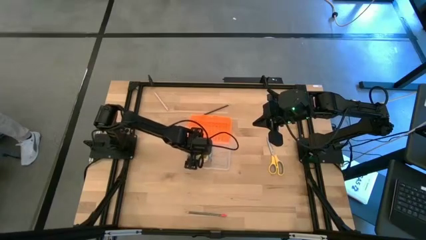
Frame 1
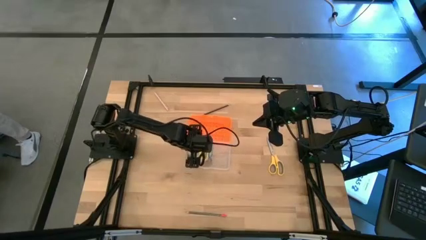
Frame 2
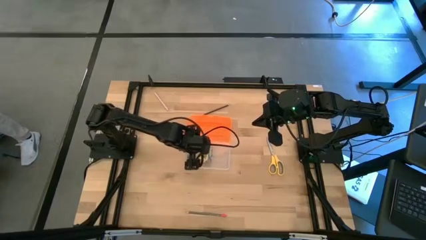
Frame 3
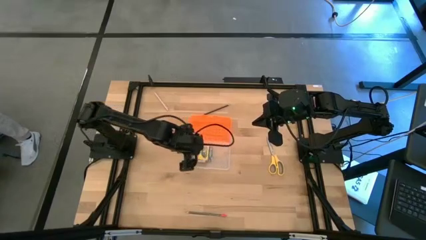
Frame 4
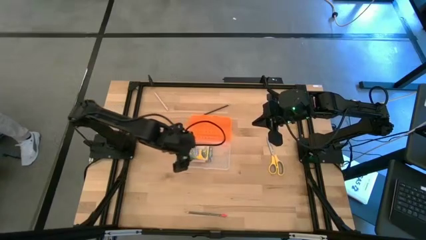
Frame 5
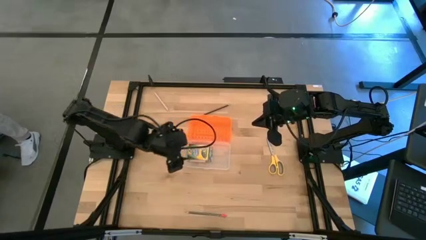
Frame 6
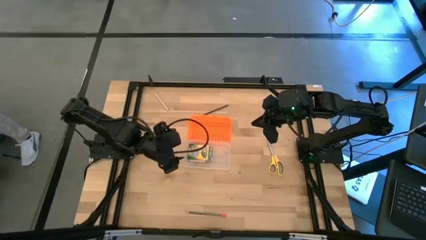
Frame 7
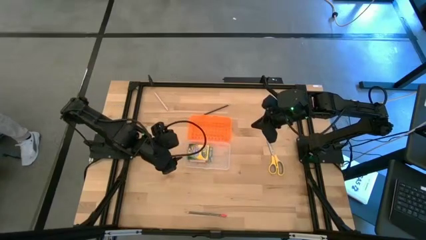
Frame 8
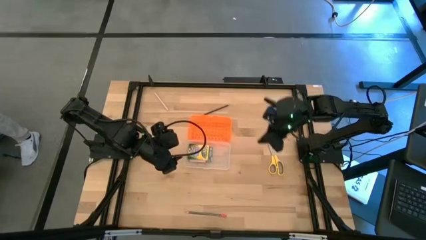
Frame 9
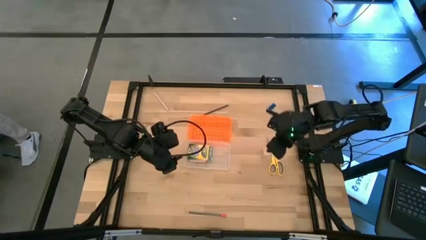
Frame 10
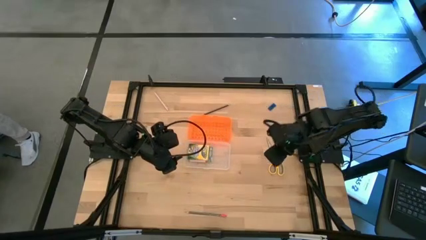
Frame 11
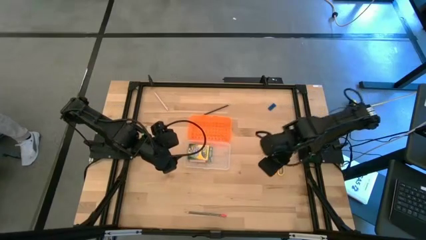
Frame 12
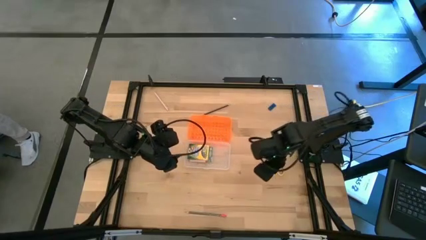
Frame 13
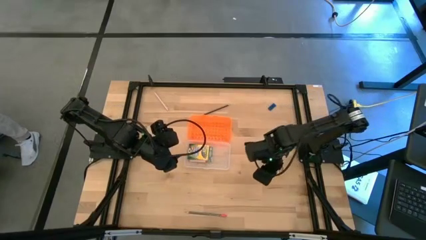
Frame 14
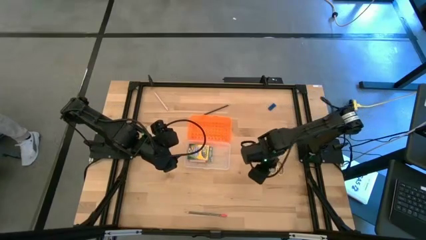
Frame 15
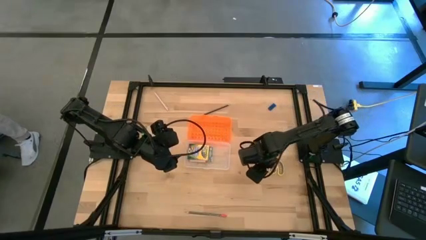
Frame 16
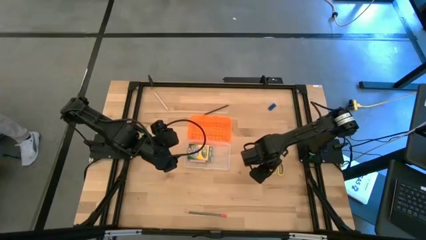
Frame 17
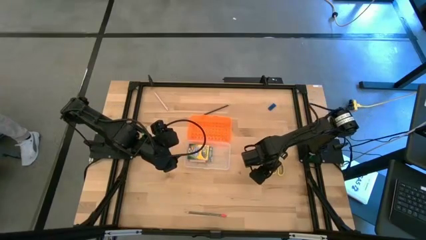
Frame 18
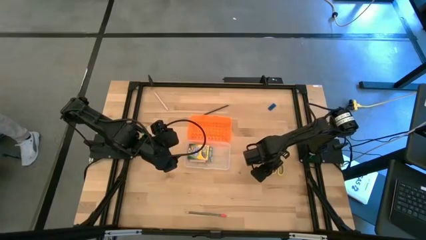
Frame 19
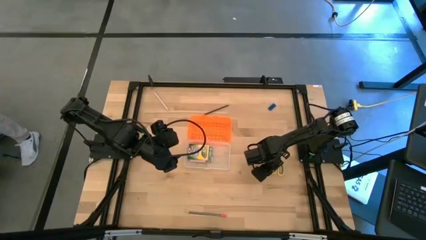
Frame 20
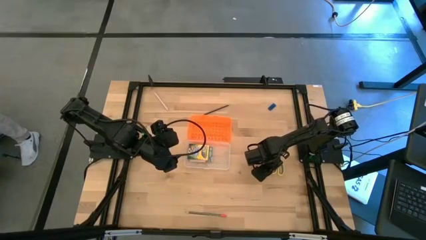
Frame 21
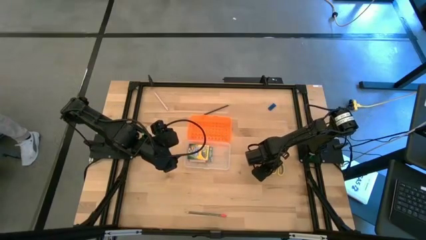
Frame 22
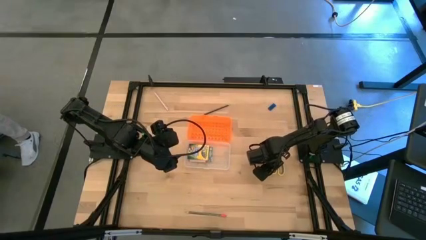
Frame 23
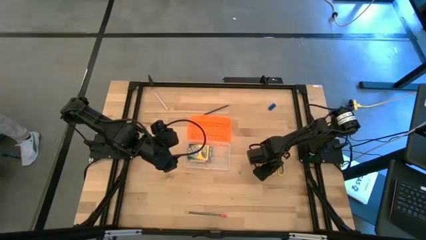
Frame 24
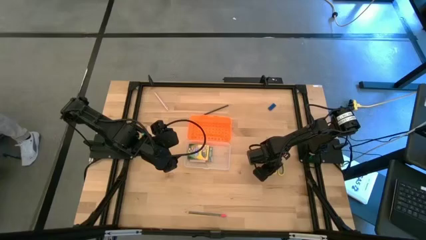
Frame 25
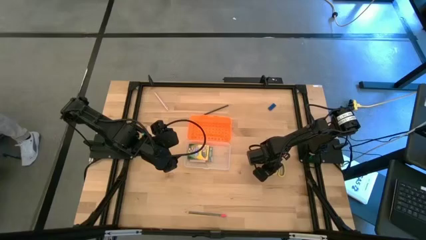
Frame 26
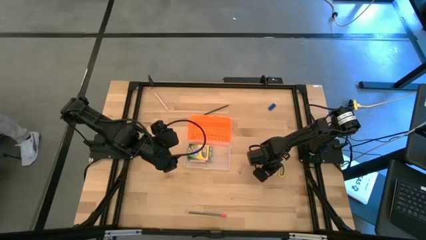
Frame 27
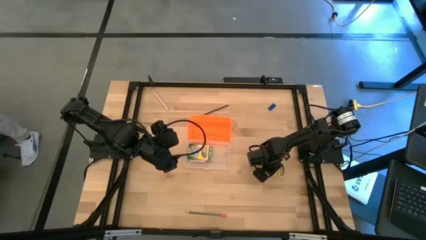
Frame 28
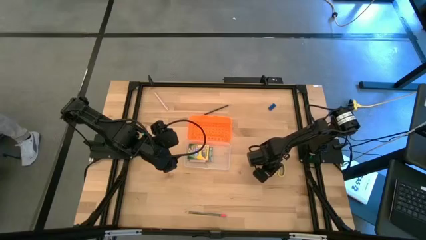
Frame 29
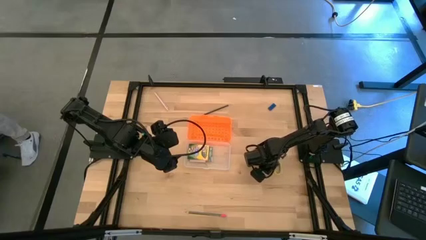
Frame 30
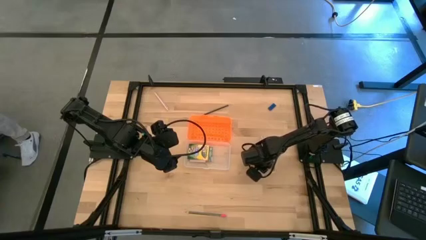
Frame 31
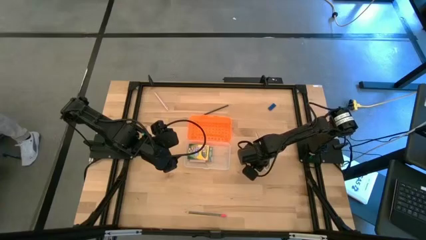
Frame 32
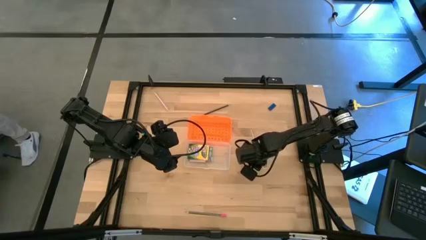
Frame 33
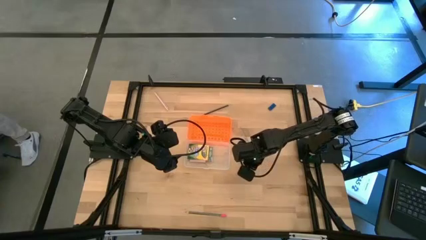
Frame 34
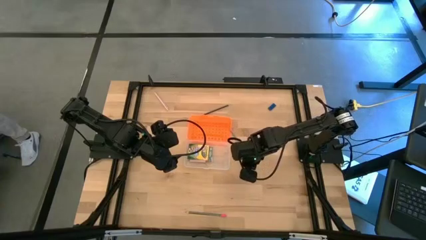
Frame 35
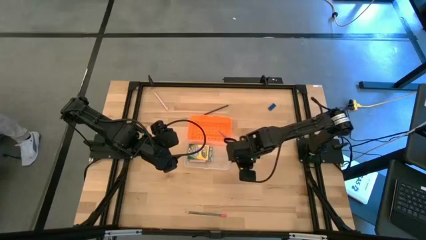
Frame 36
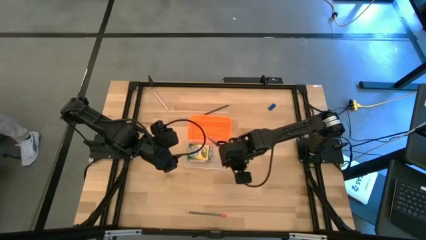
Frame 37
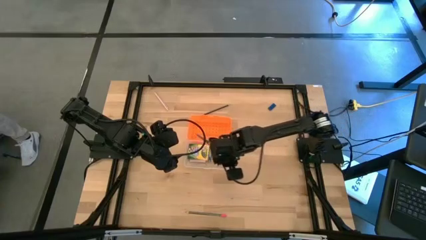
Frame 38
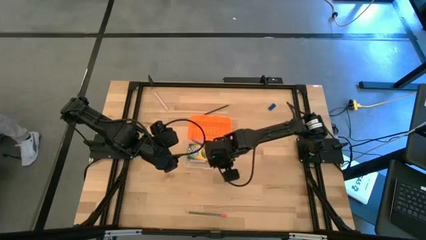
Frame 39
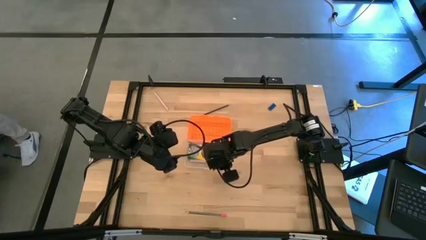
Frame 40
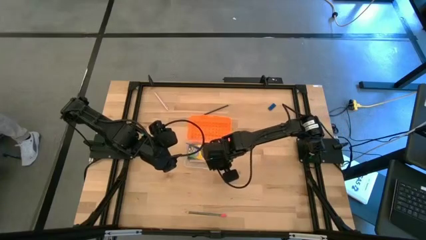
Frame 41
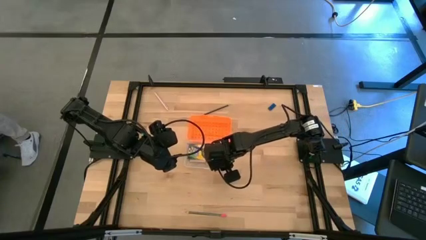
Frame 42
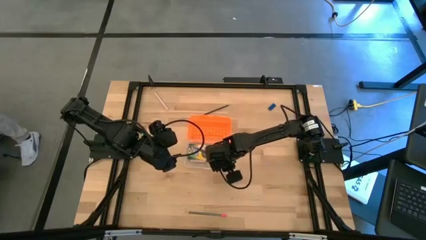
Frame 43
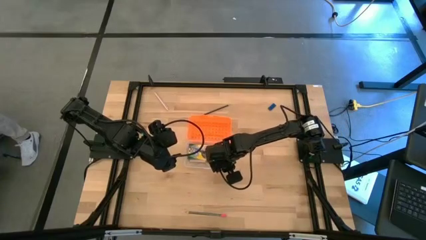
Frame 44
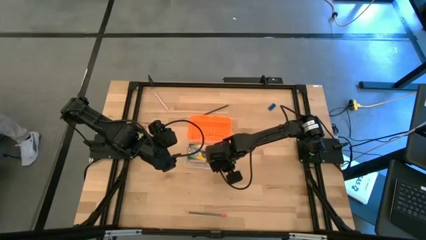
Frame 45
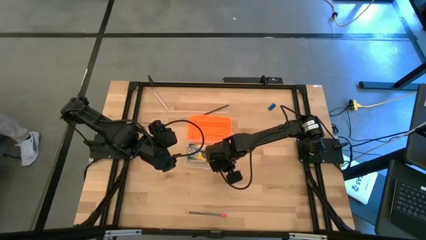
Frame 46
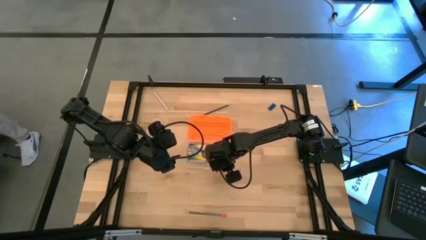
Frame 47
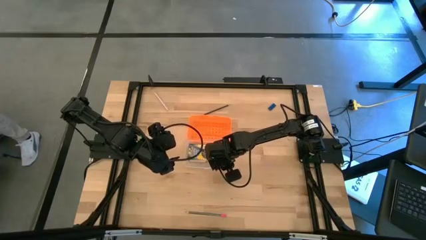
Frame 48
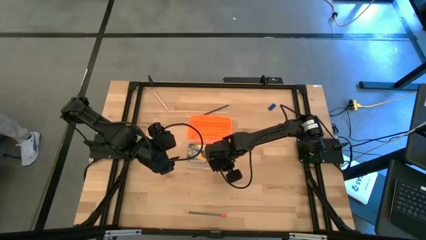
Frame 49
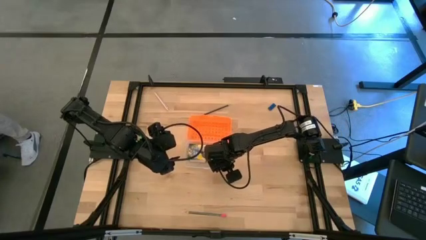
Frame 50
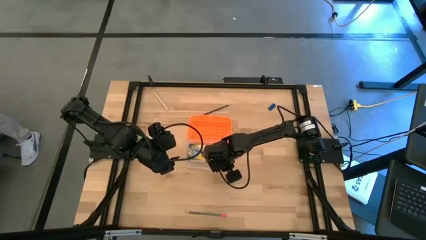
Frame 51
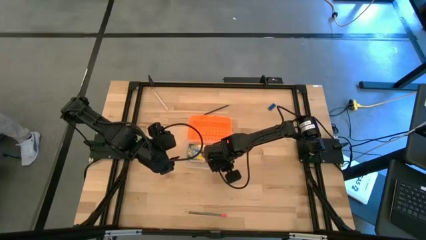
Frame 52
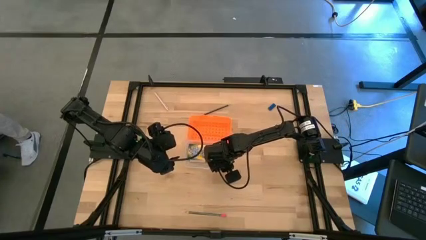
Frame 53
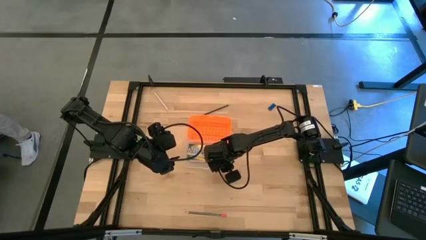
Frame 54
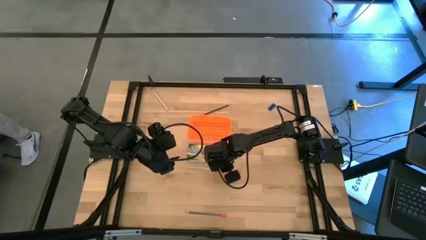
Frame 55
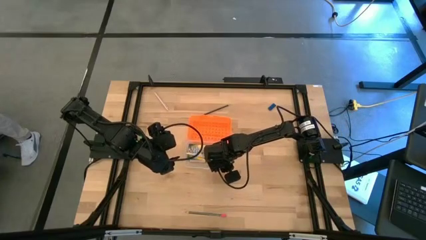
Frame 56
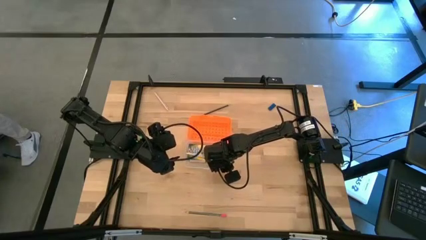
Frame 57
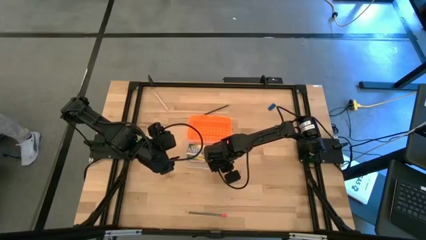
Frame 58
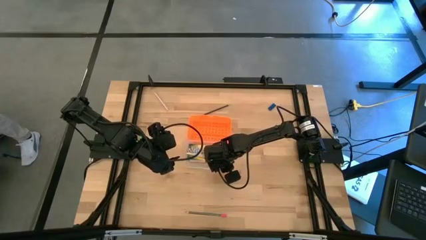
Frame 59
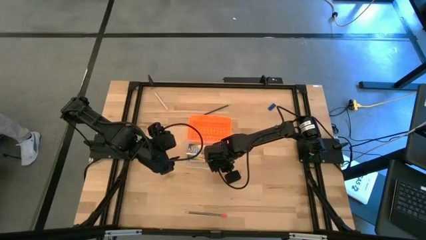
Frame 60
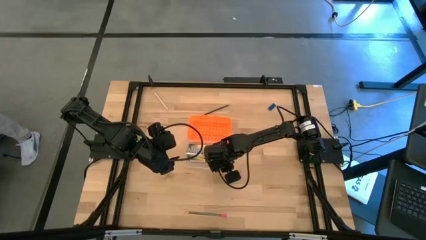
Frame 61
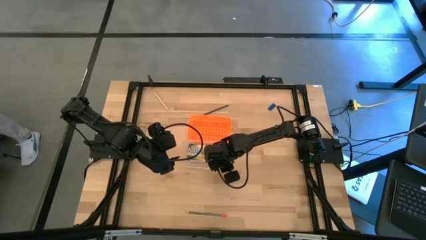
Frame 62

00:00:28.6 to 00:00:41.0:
Task: Pack school essentials
Put the yellow scissors into the supply box
